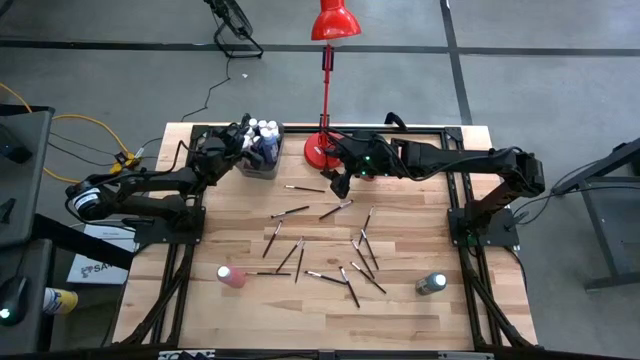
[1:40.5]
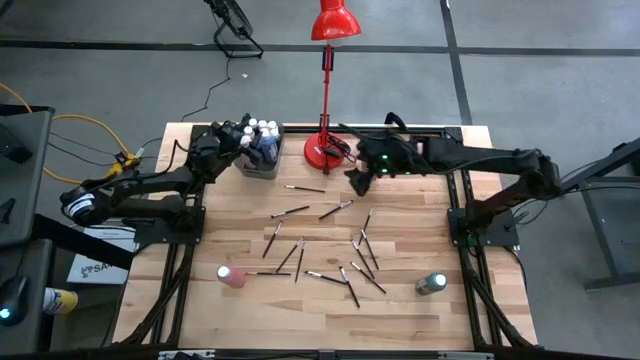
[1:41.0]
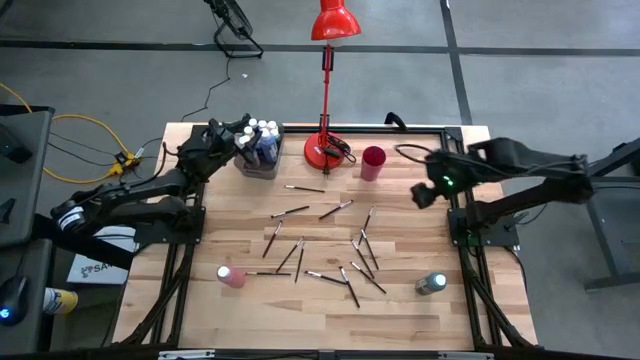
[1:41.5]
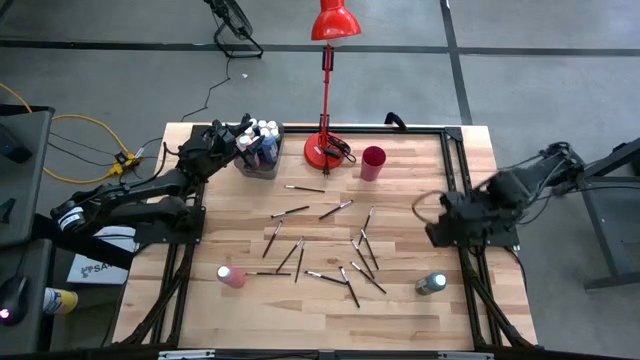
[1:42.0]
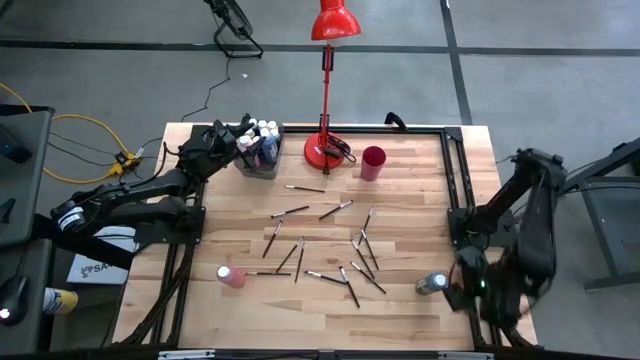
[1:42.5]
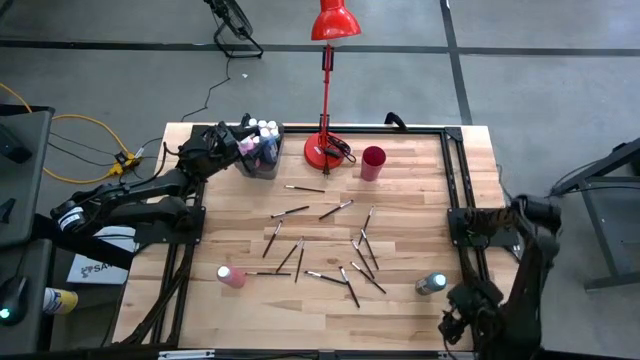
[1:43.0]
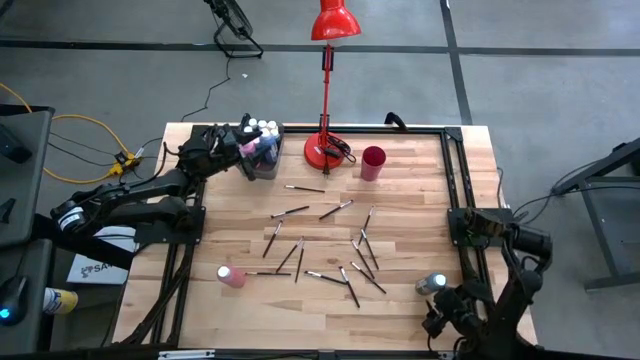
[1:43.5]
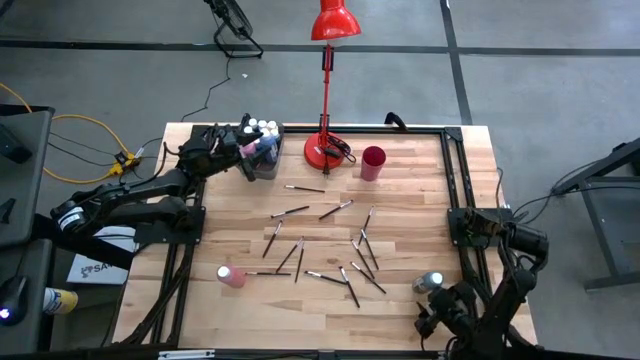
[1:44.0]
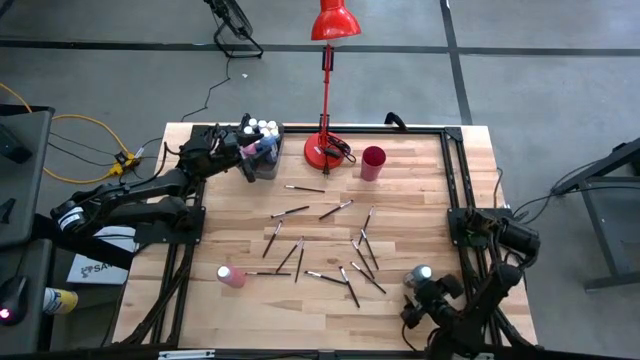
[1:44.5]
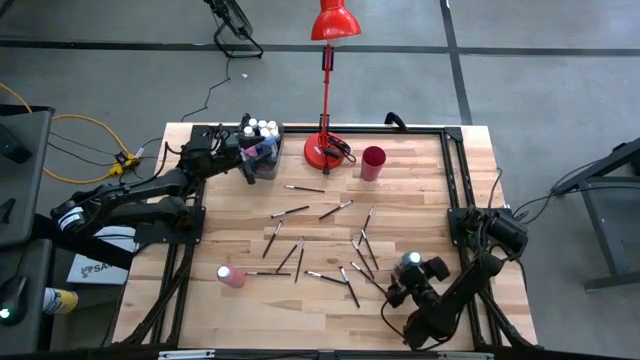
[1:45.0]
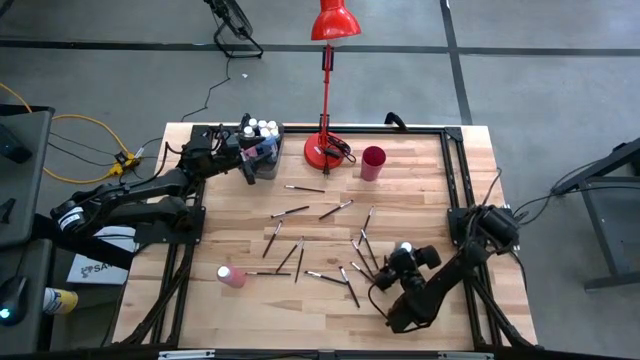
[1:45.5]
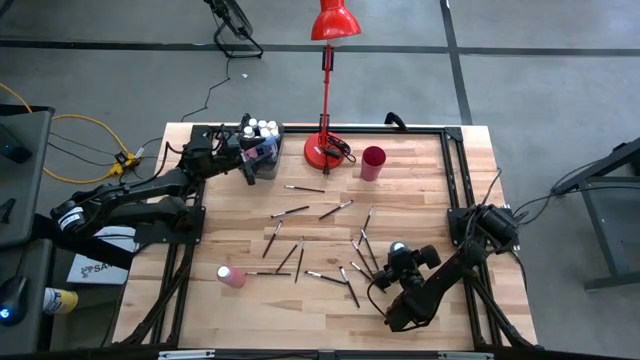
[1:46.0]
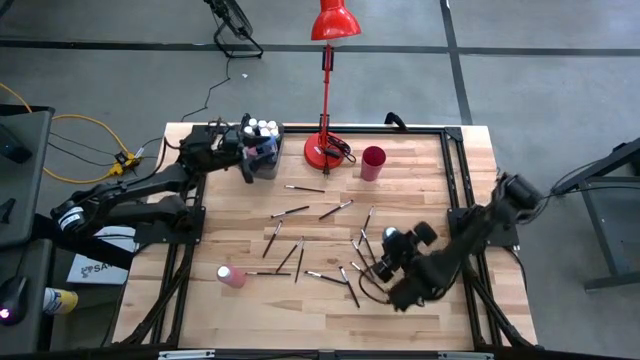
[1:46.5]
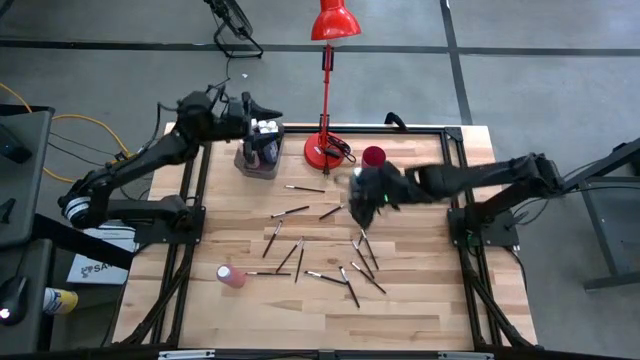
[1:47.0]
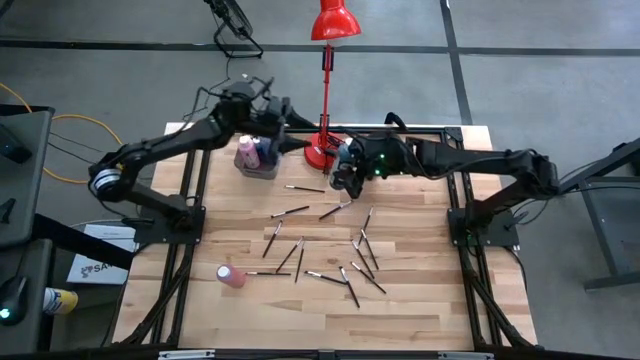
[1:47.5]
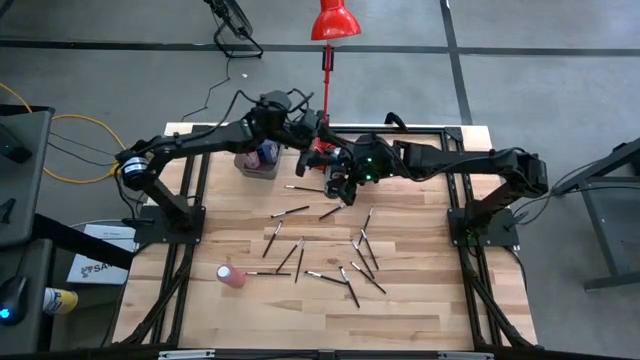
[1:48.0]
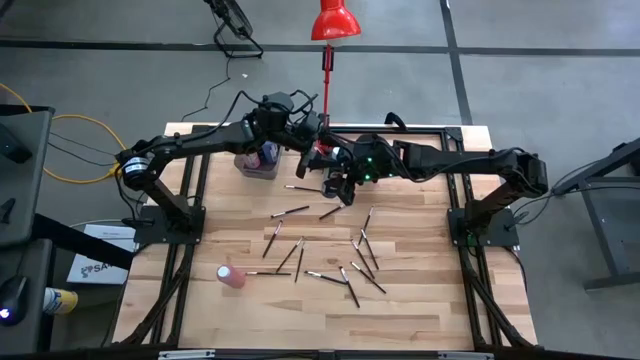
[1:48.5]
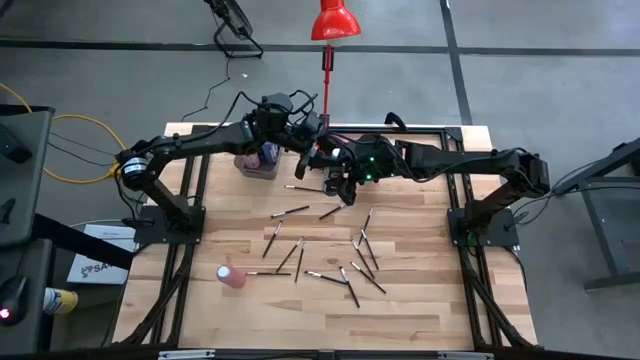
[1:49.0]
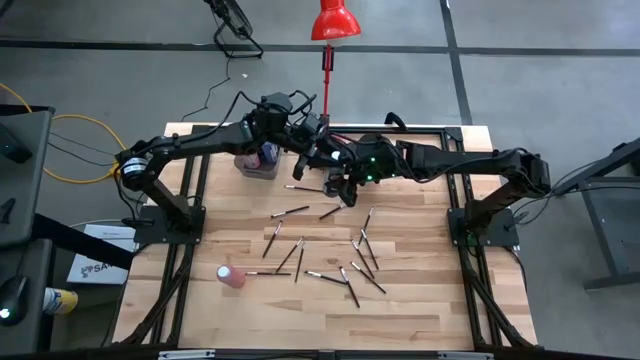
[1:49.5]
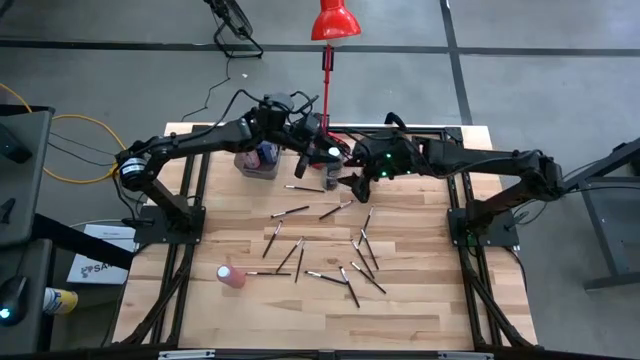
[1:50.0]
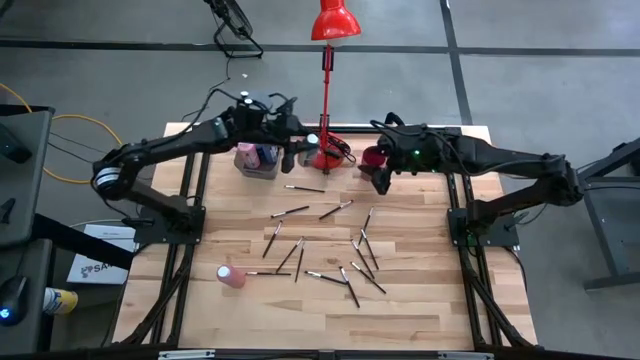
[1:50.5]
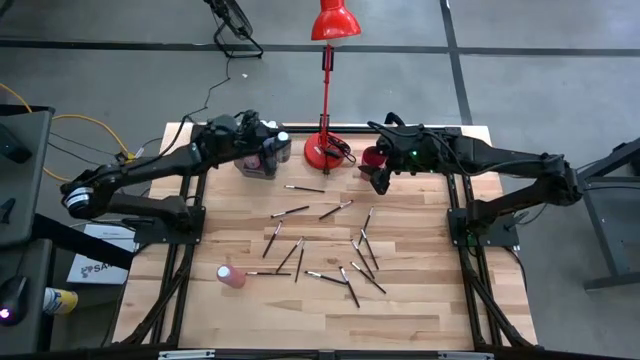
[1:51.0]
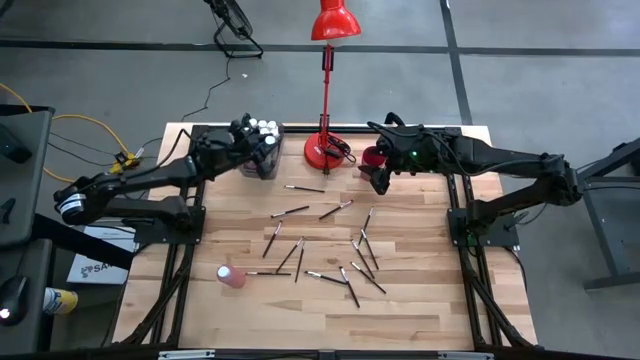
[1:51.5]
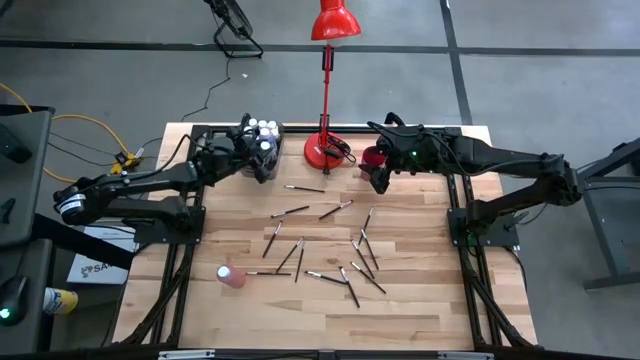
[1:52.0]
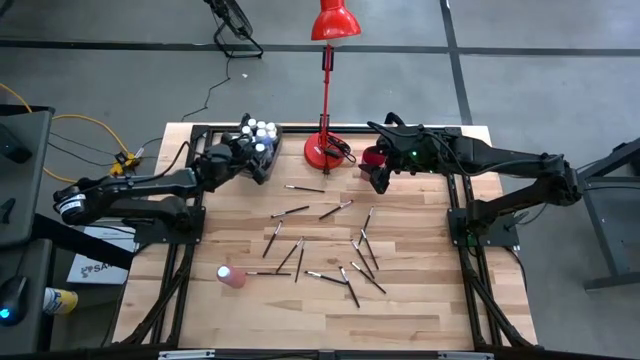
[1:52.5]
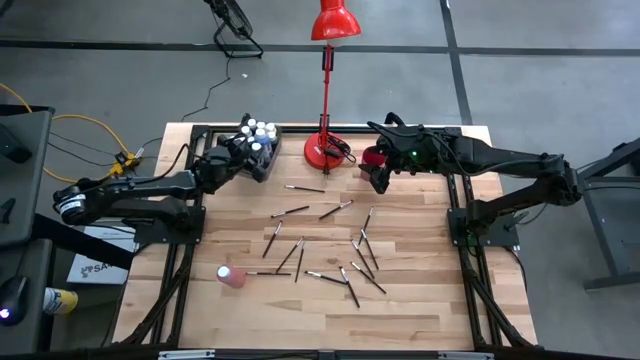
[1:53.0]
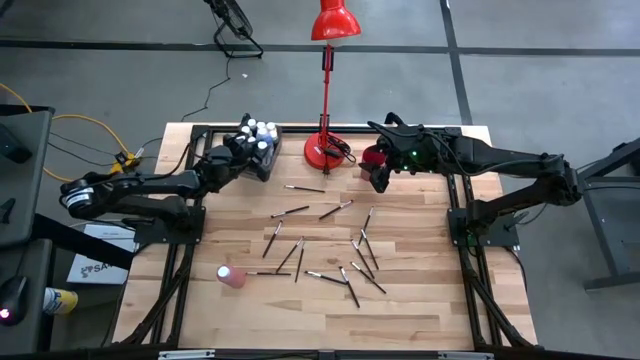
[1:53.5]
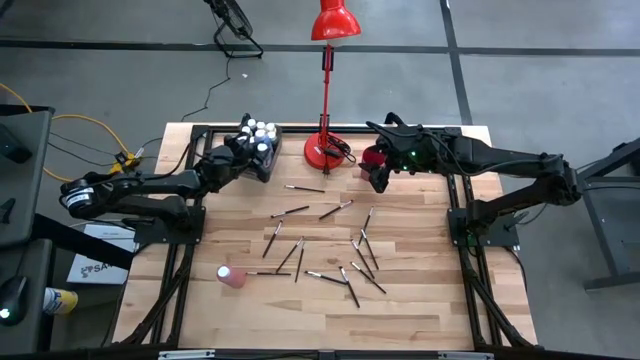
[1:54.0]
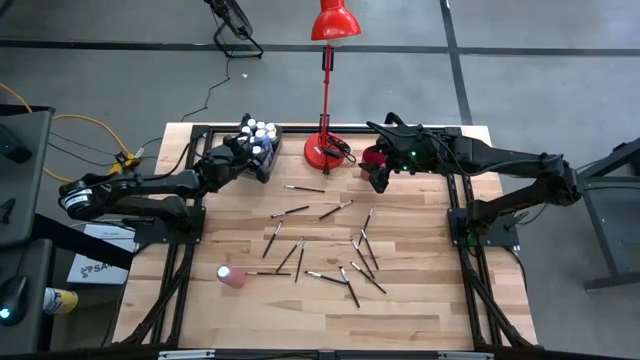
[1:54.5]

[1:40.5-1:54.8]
Task: Pick & Place Paint Supplies
Put the large dark blue black paint bottle into the bin

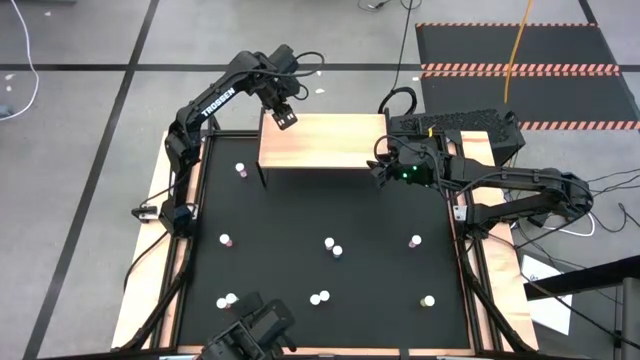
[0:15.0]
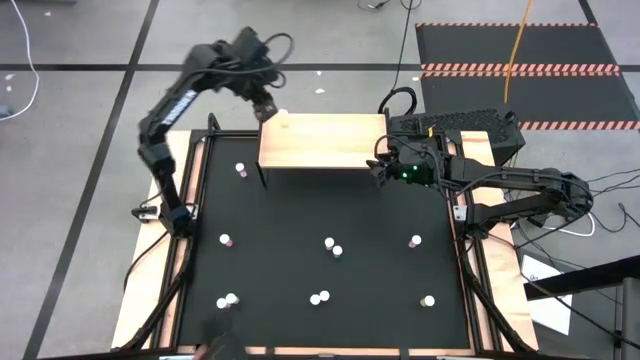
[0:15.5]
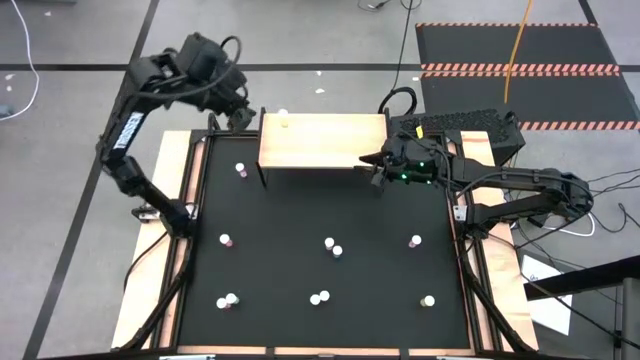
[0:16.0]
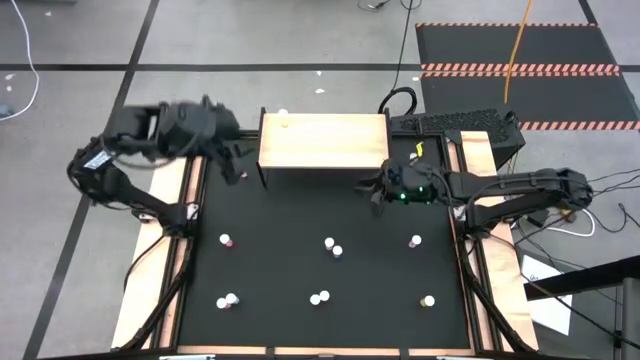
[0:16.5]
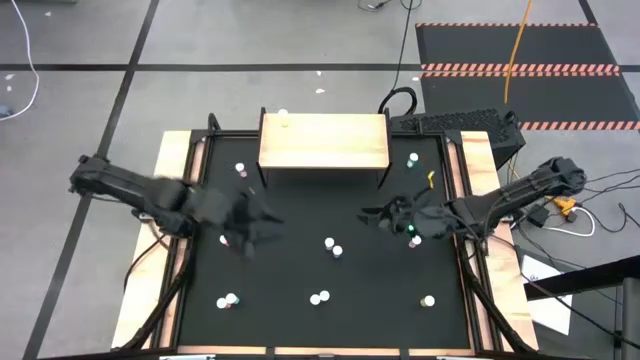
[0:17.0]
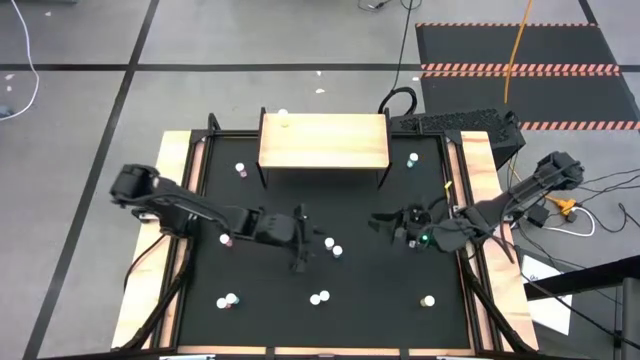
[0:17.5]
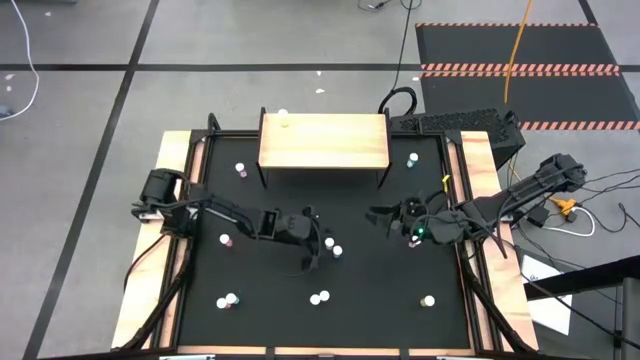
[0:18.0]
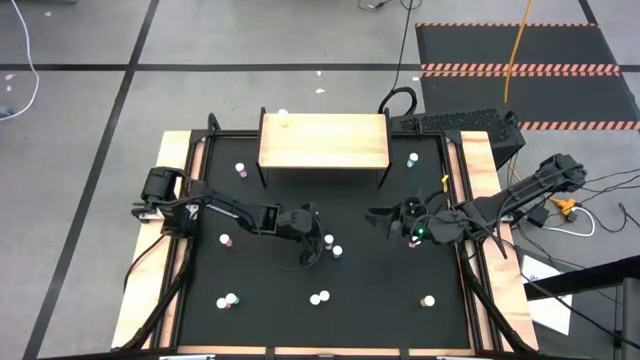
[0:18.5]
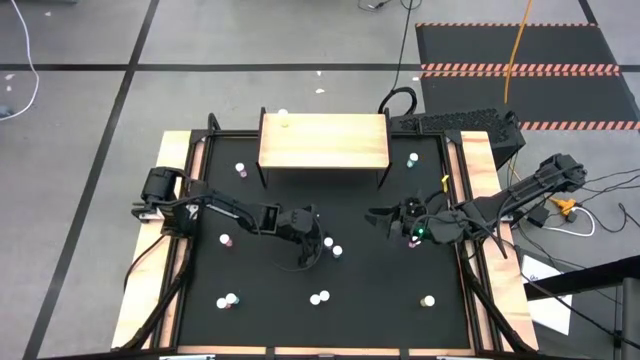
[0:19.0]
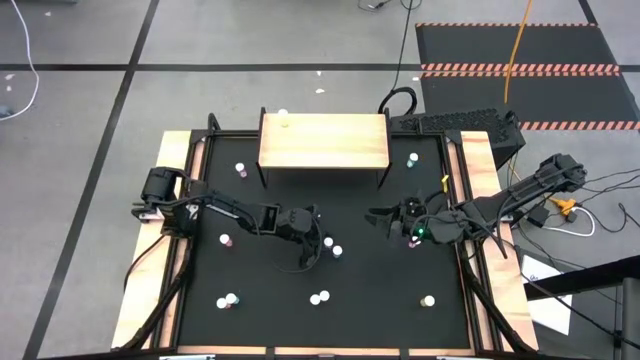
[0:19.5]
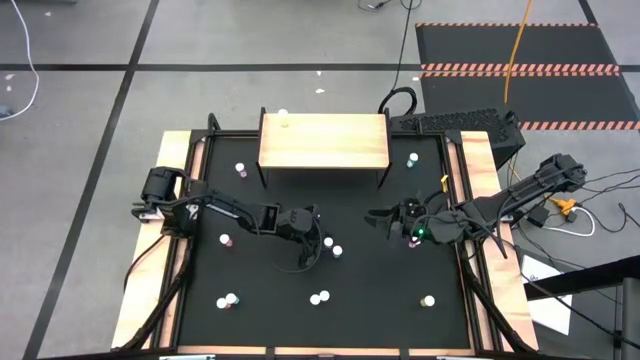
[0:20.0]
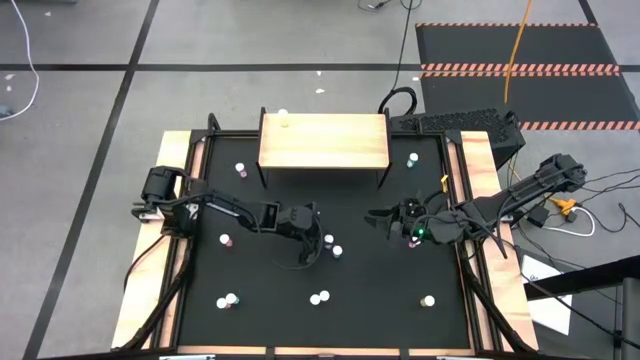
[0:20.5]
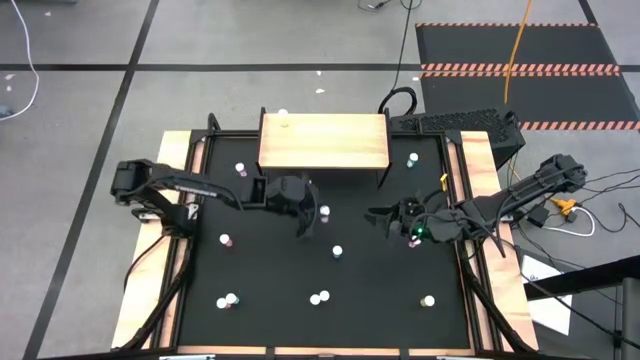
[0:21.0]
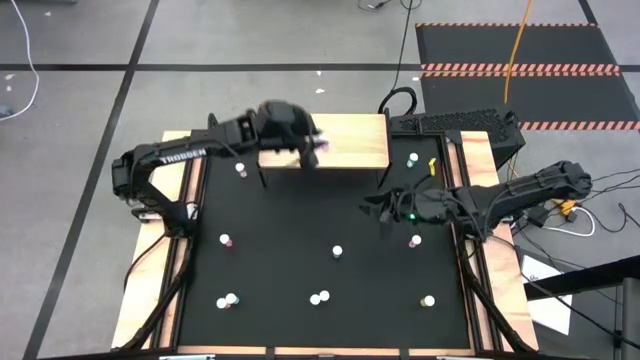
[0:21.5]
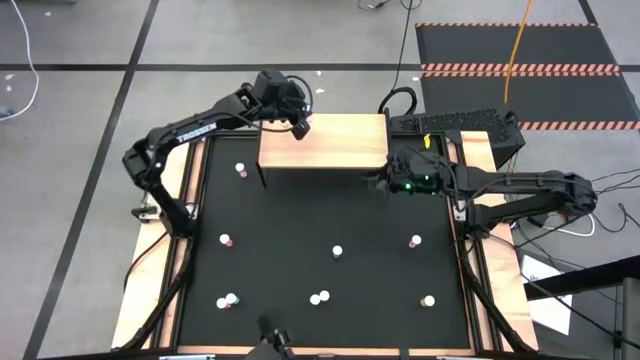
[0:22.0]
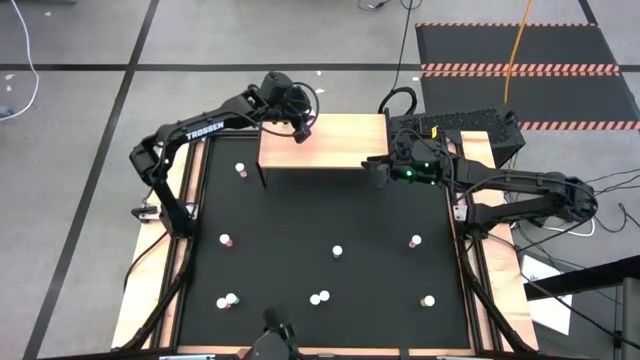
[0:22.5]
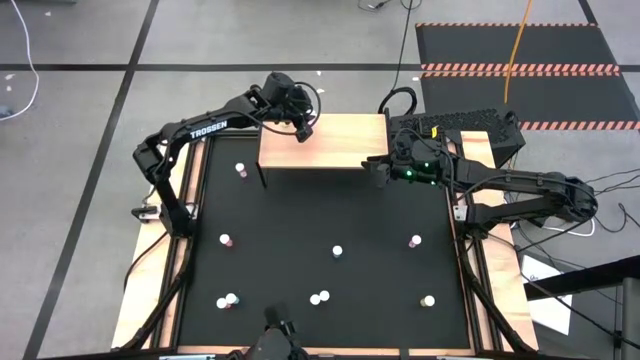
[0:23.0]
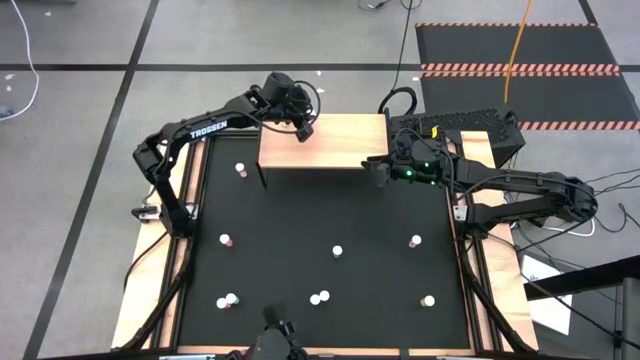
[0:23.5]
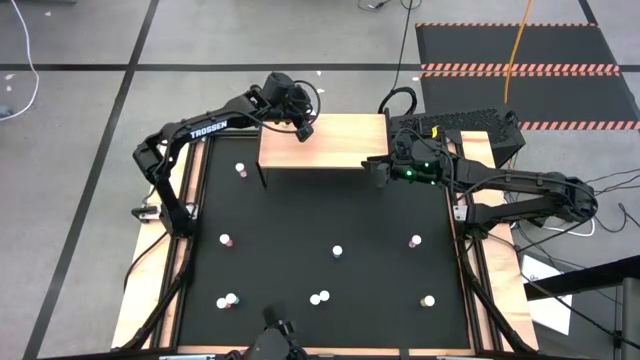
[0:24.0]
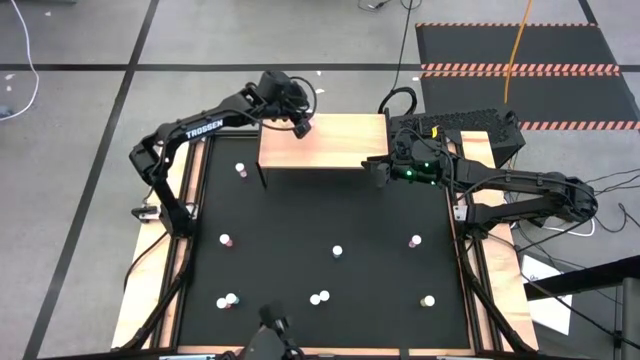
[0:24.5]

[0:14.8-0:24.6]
Task: Pick and place medicine bottles onto shelf by color
Put the middle pink pill bottle on the shelf
